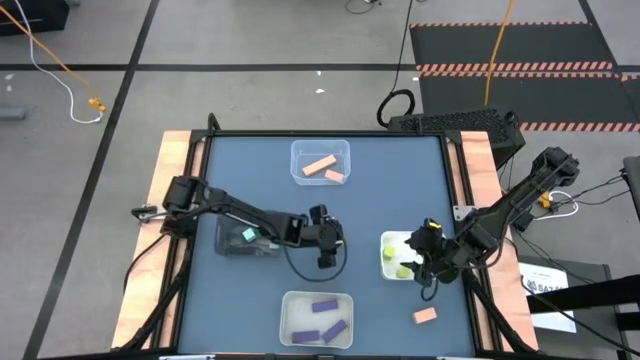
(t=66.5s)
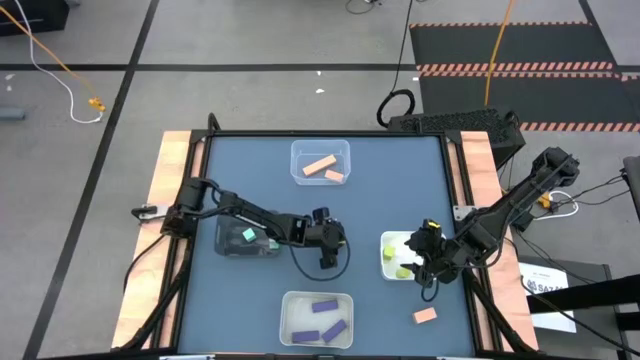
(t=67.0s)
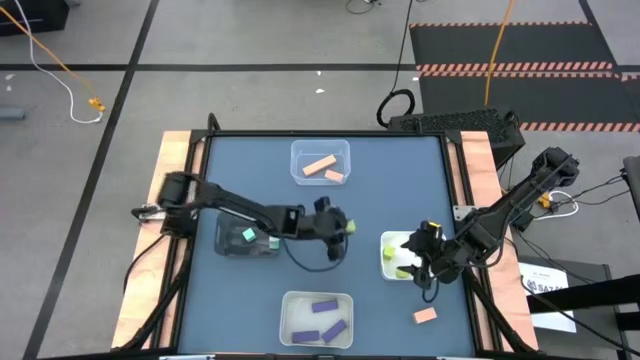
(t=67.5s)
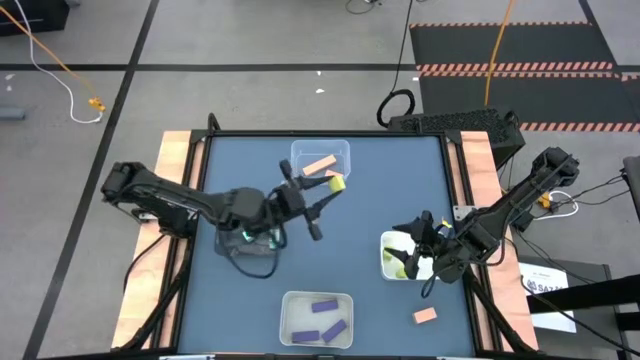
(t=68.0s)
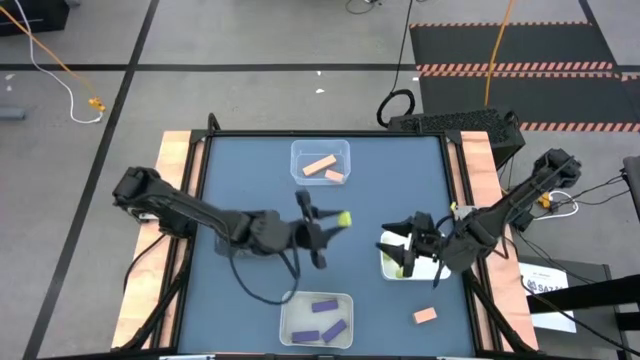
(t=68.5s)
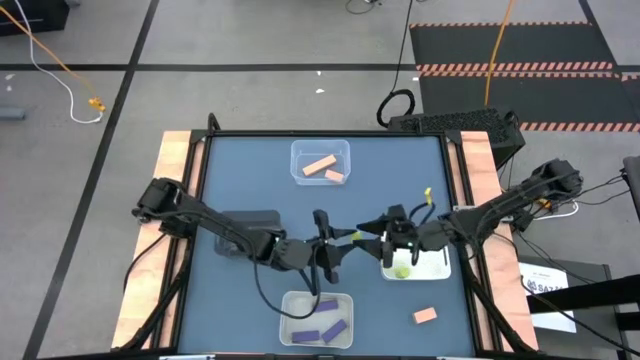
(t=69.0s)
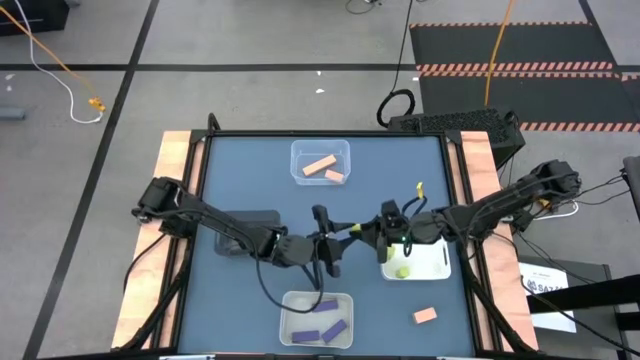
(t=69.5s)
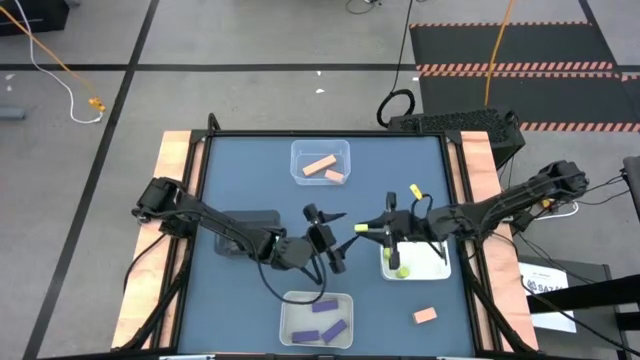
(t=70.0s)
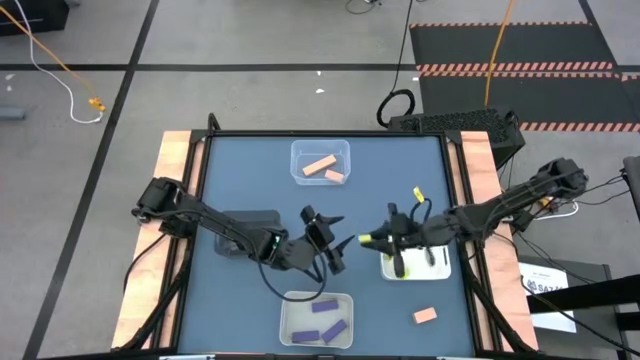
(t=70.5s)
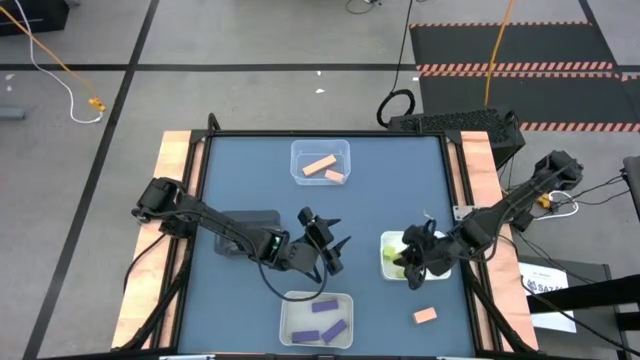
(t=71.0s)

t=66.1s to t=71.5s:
Task: Sort & place blocks by color
Put the green block into the white bin

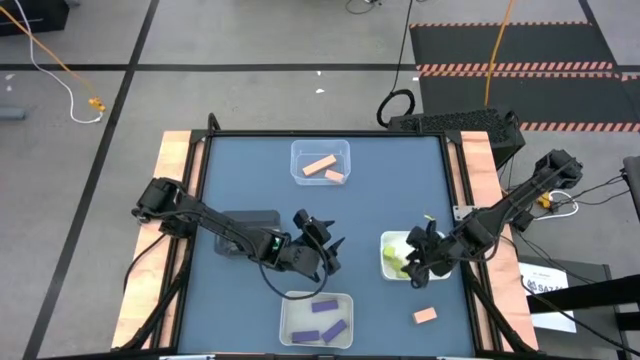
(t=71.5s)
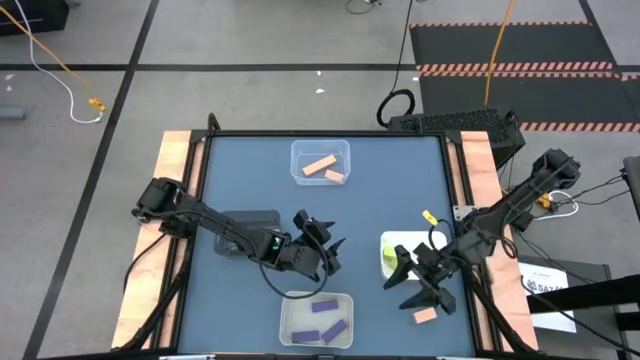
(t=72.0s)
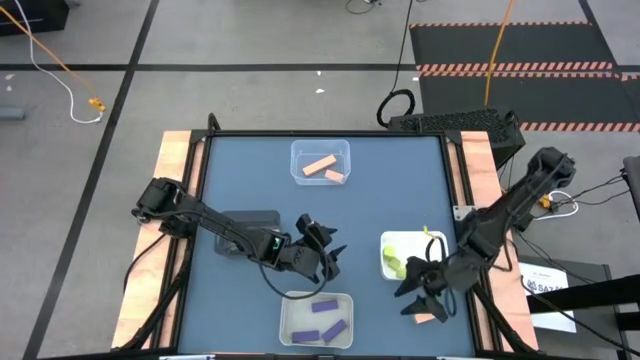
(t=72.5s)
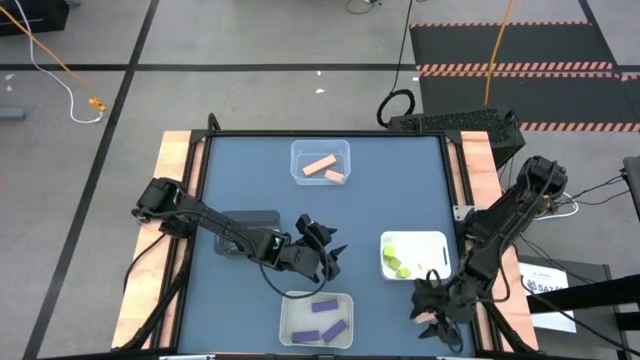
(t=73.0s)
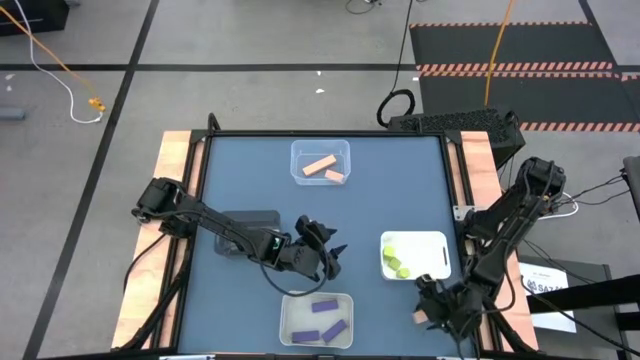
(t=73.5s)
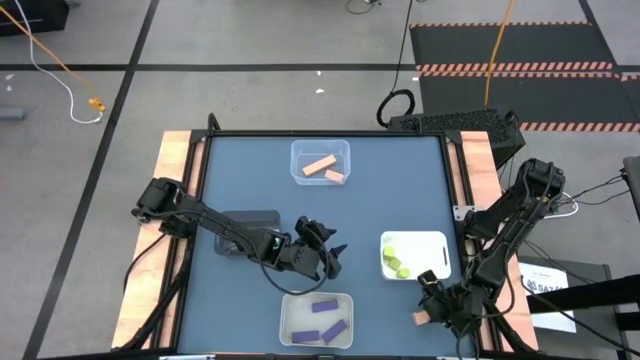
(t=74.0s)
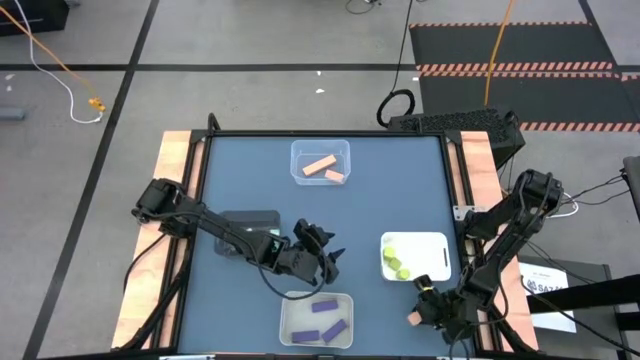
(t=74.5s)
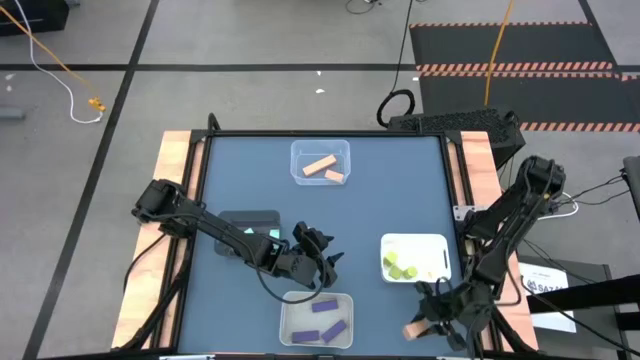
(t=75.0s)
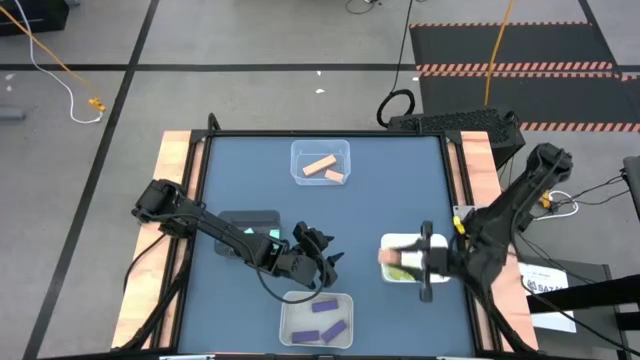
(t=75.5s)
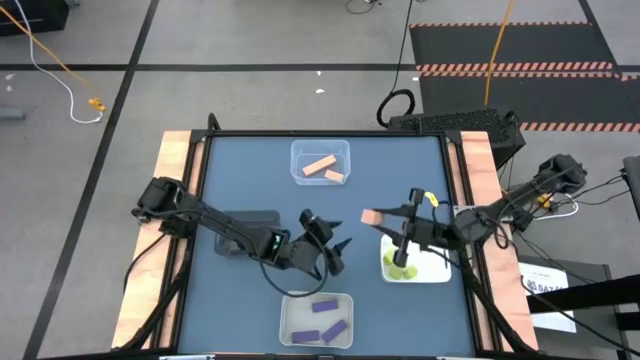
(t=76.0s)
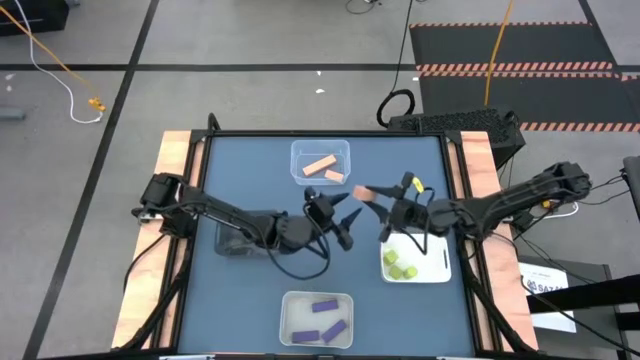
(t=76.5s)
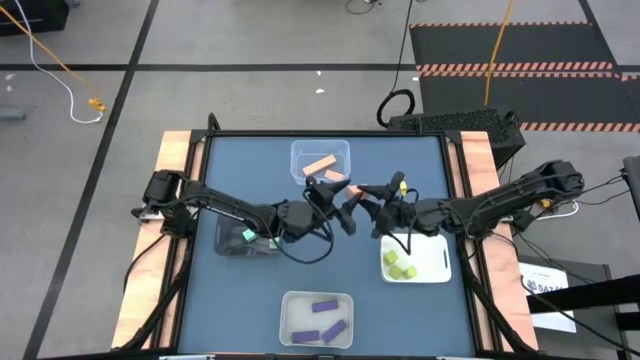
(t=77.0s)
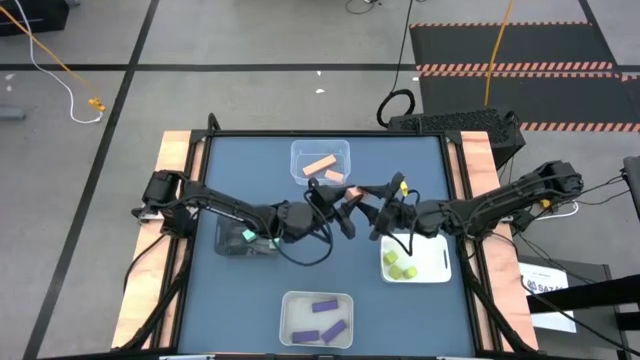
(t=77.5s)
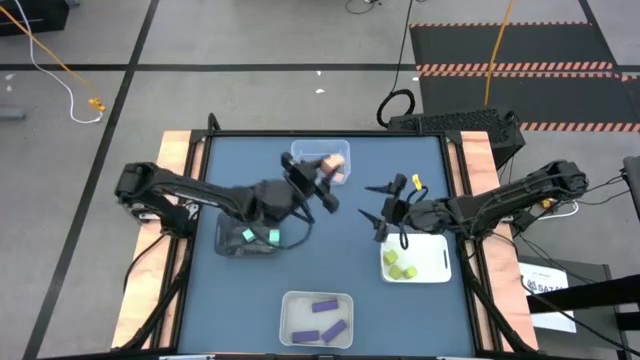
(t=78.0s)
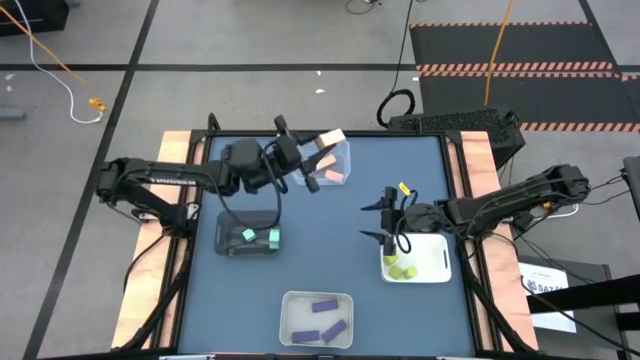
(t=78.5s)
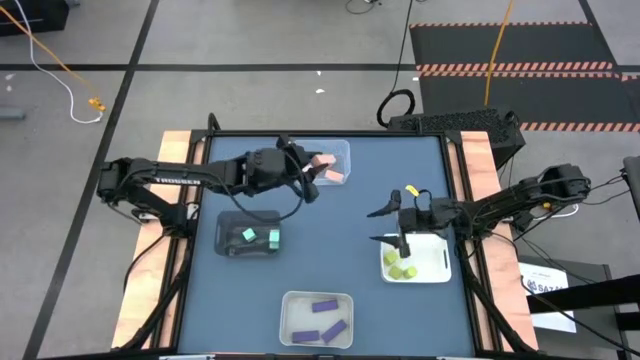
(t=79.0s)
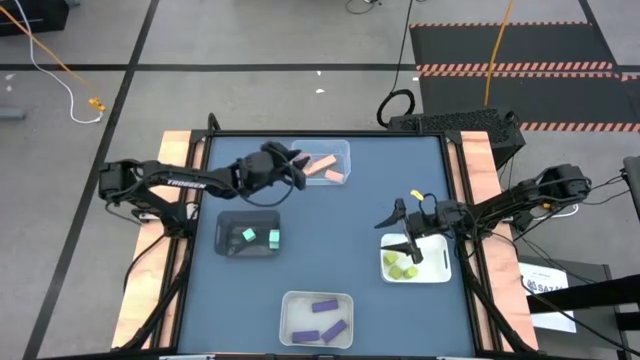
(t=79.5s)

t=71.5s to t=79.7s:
Put the orange block into the transparent bin

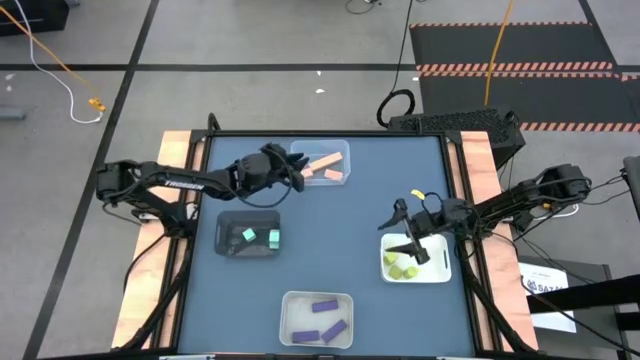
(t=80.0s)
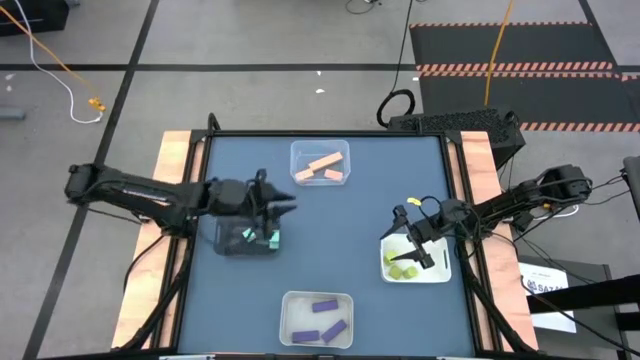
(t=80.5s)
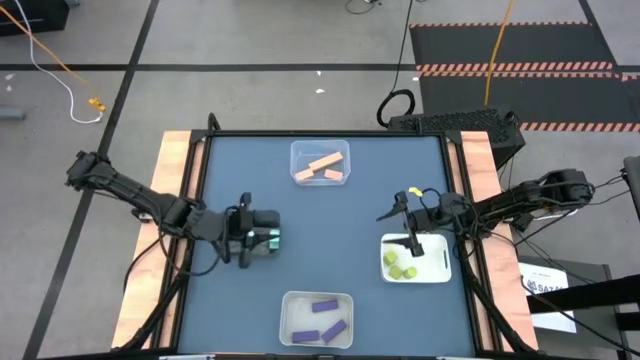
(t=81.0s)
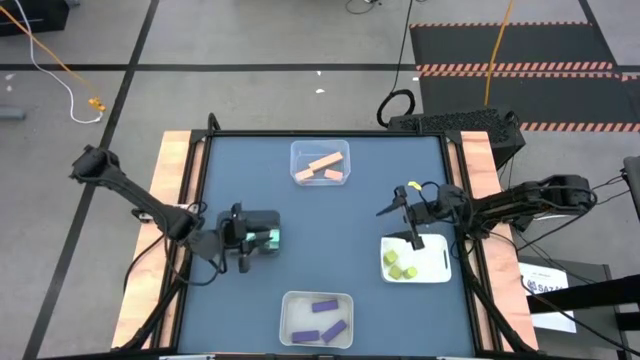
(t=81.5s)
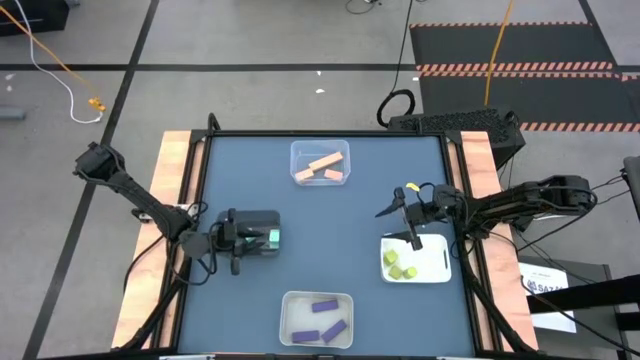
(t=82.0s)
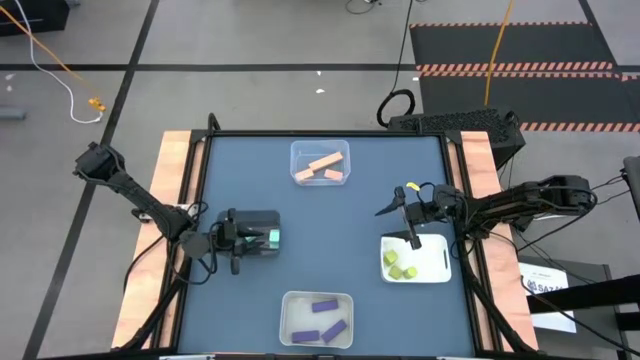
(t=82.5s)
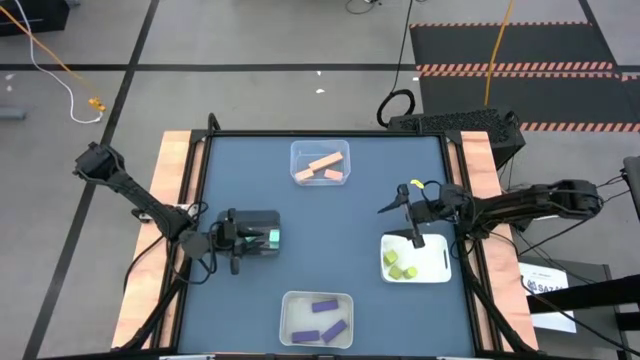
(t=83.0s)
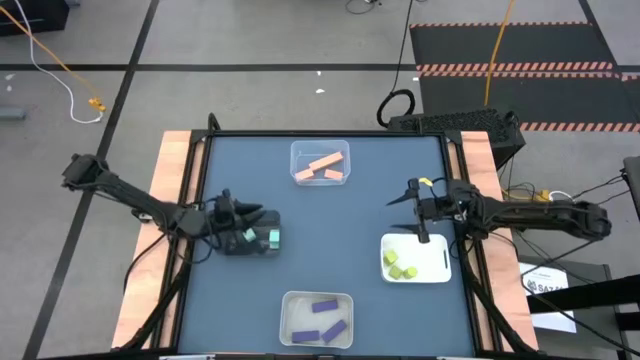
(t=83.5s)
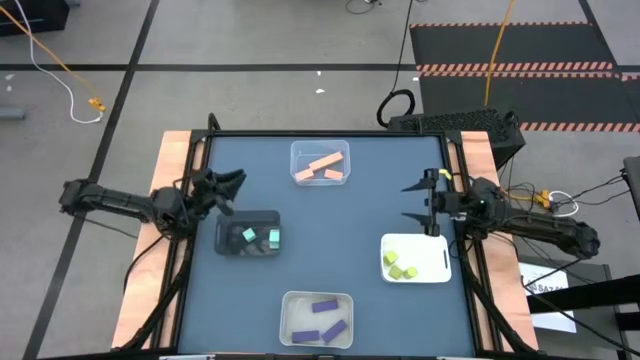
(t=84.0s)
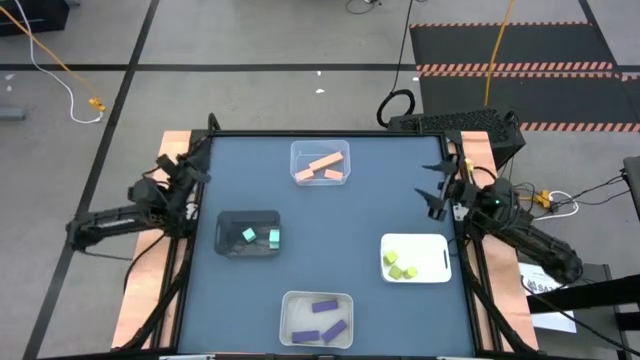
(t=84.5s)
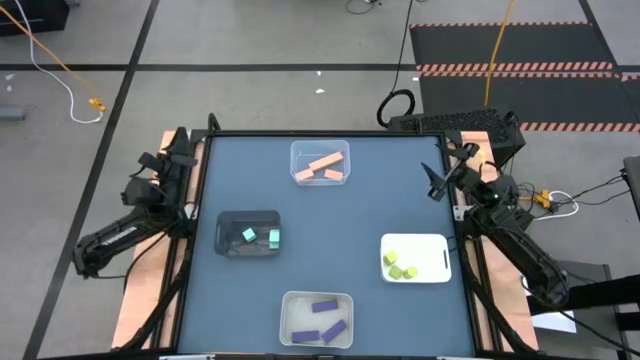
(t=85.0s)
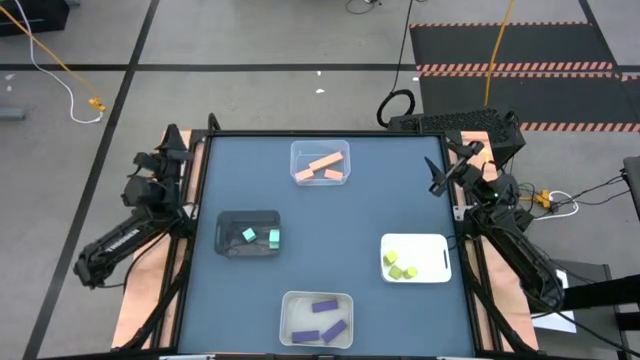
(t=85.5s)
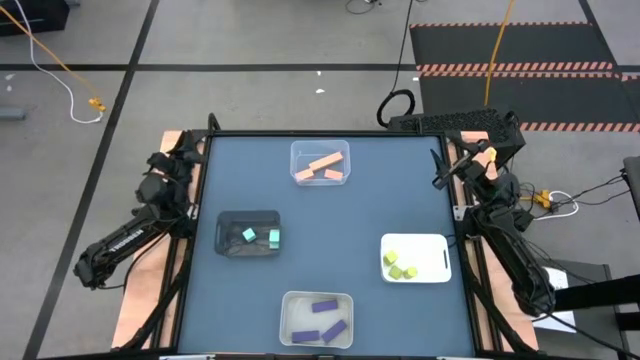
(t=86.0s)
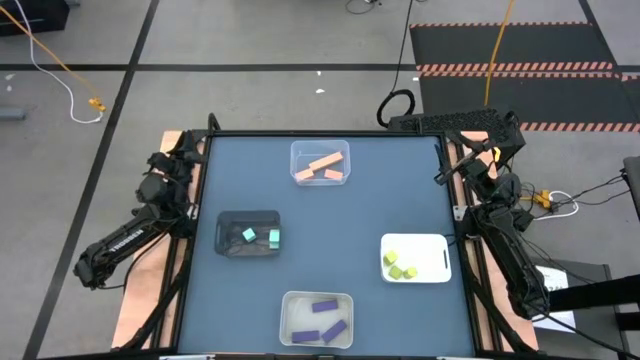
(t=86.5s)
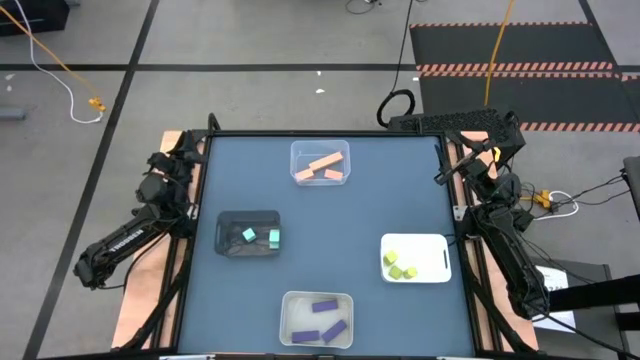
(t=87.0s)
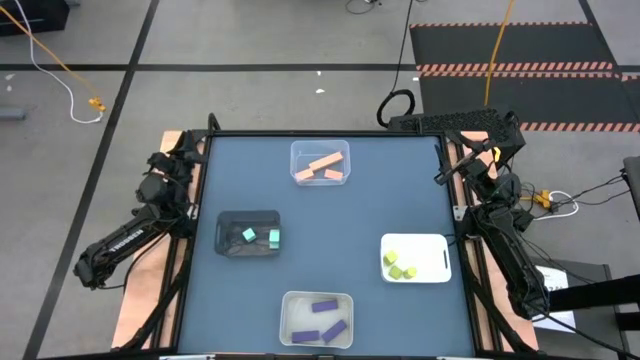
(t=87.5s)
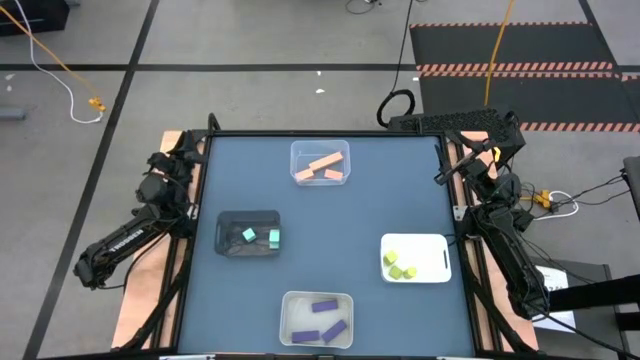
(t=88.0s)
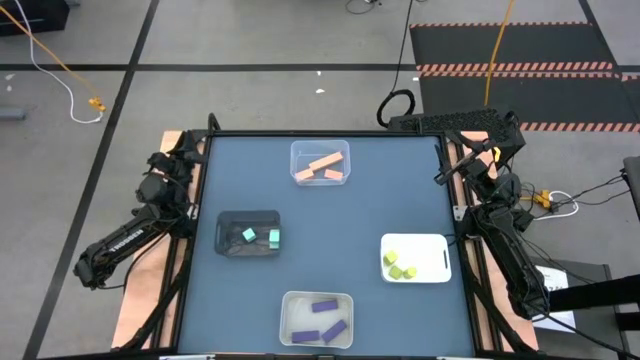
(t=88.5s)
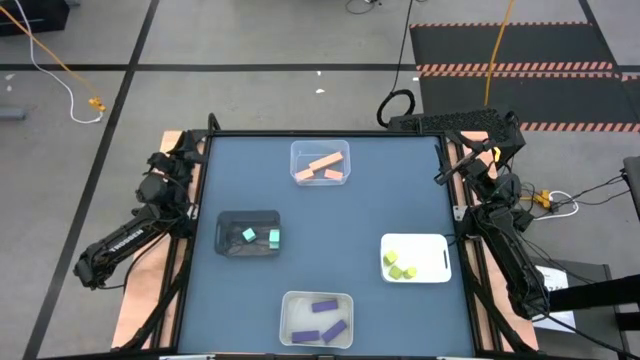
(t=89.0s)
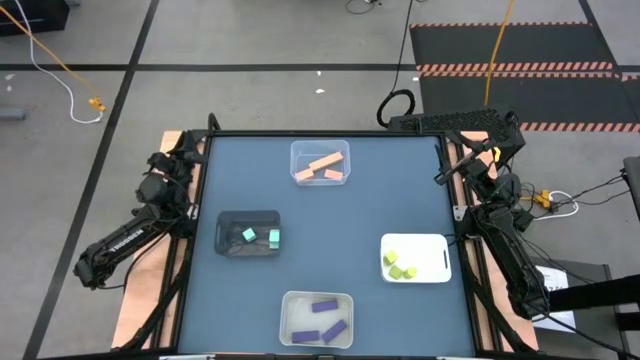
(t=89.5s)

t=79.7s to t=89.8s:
Return to Home Position
